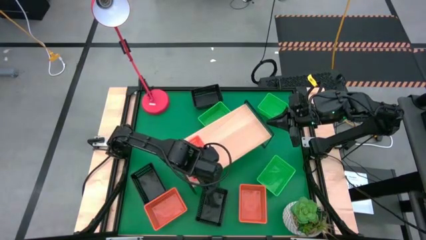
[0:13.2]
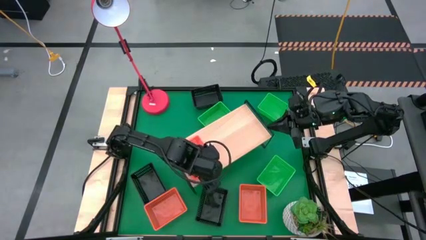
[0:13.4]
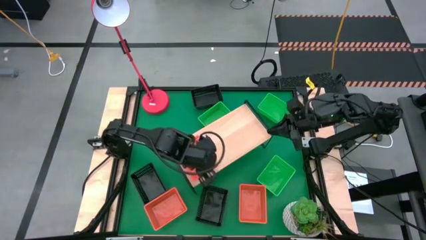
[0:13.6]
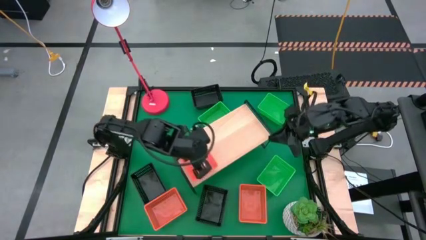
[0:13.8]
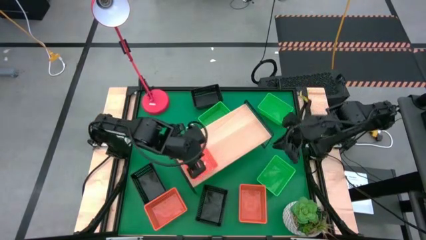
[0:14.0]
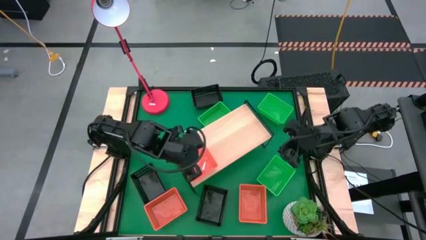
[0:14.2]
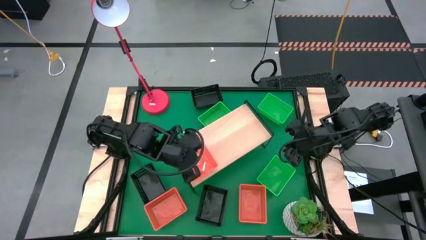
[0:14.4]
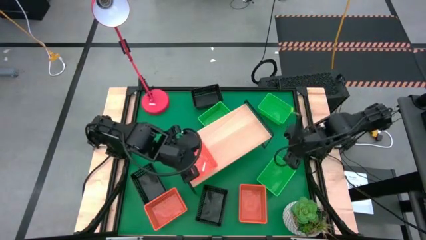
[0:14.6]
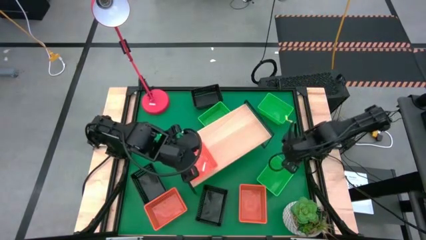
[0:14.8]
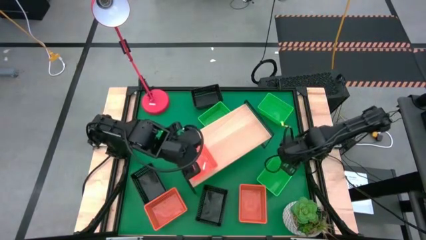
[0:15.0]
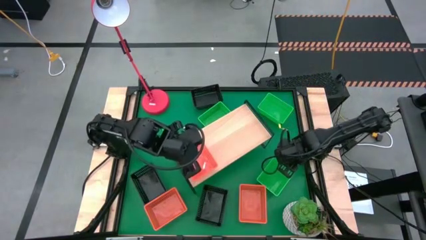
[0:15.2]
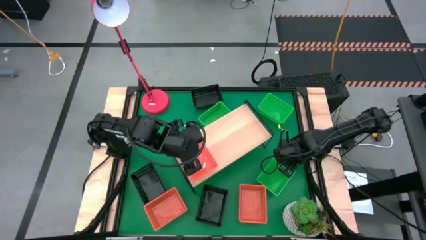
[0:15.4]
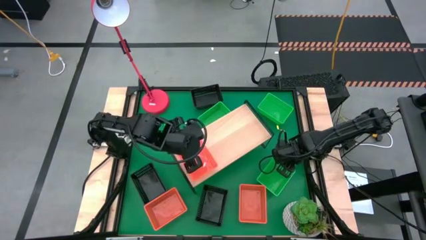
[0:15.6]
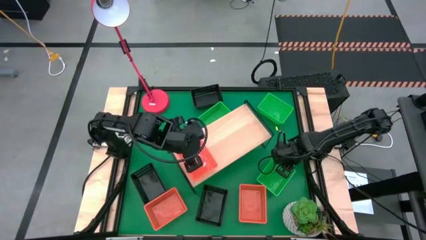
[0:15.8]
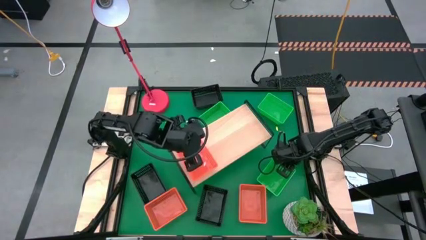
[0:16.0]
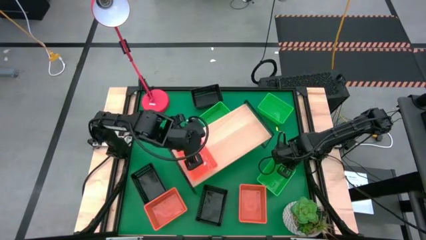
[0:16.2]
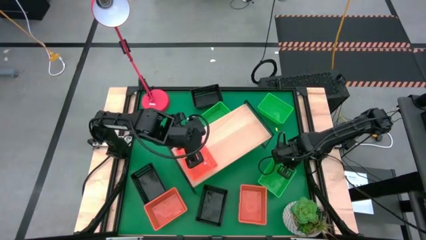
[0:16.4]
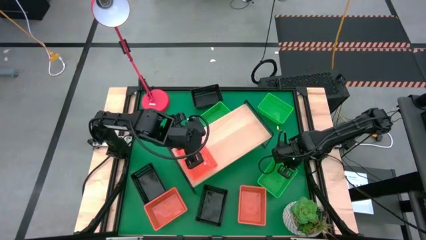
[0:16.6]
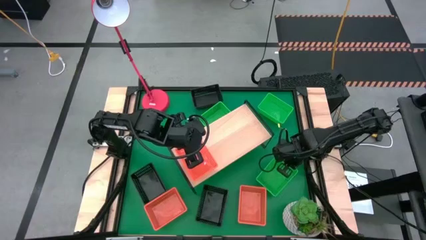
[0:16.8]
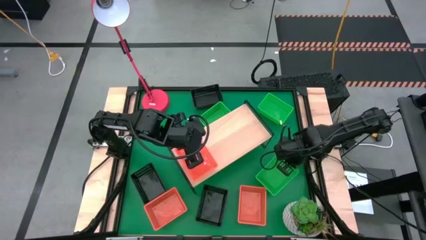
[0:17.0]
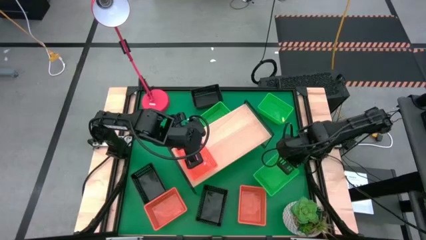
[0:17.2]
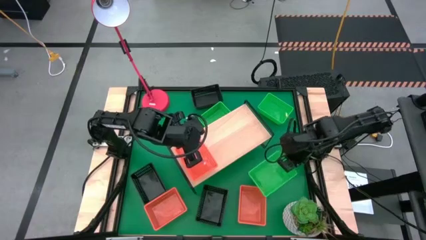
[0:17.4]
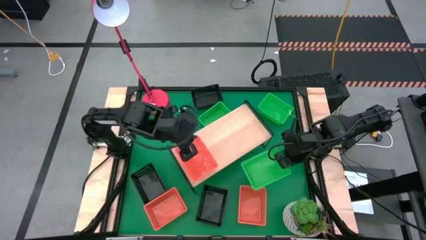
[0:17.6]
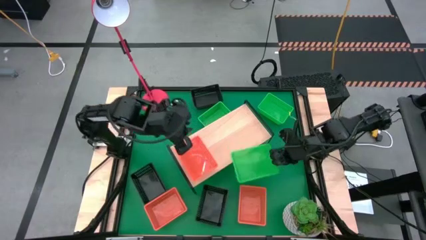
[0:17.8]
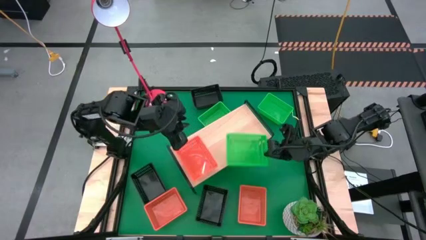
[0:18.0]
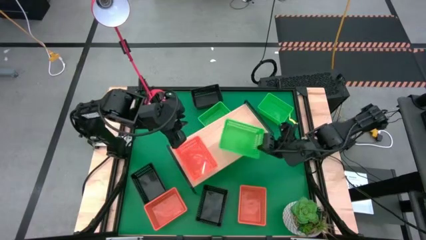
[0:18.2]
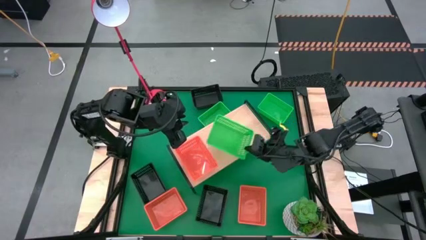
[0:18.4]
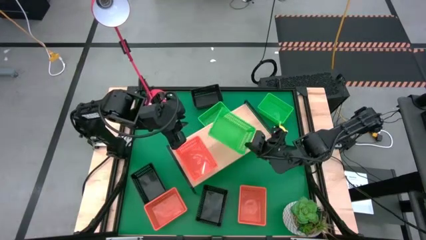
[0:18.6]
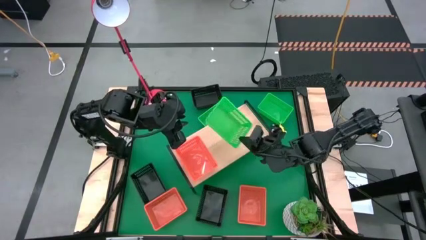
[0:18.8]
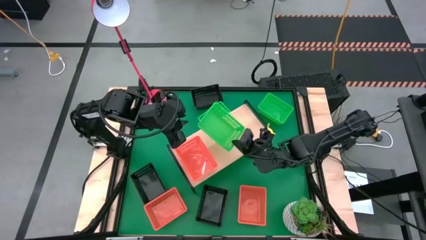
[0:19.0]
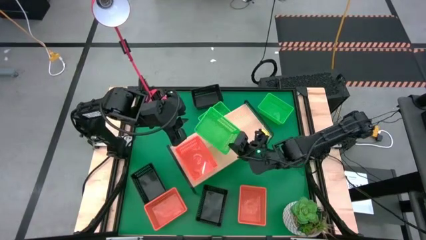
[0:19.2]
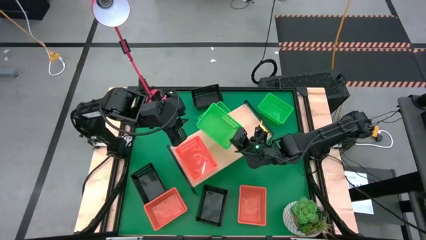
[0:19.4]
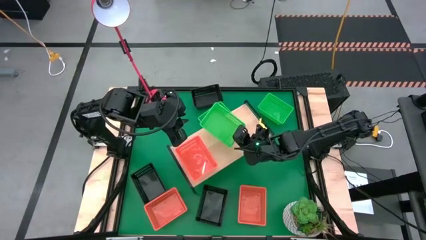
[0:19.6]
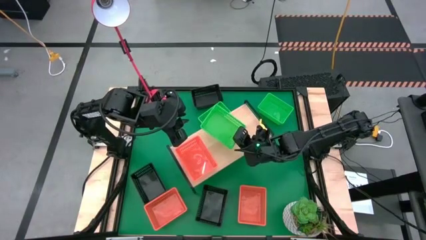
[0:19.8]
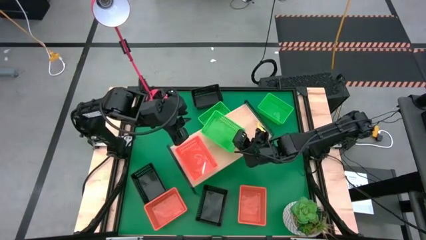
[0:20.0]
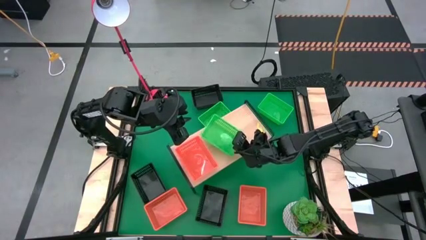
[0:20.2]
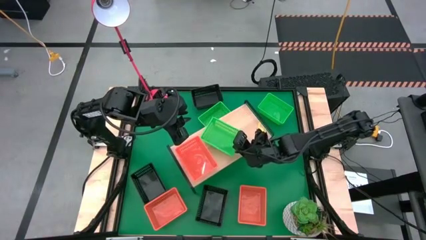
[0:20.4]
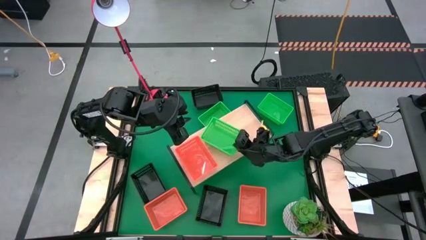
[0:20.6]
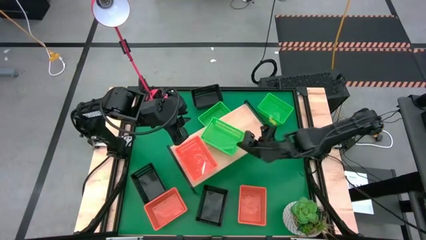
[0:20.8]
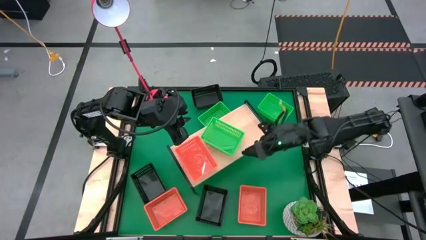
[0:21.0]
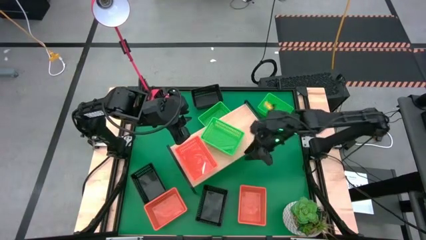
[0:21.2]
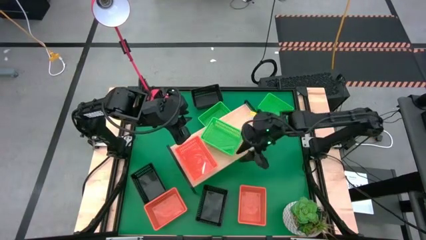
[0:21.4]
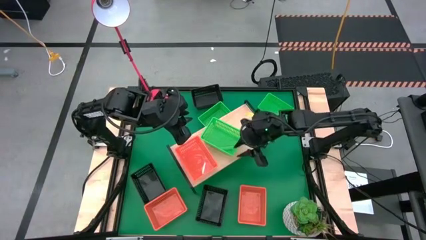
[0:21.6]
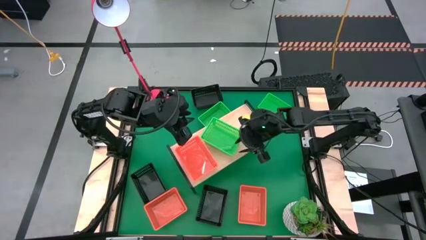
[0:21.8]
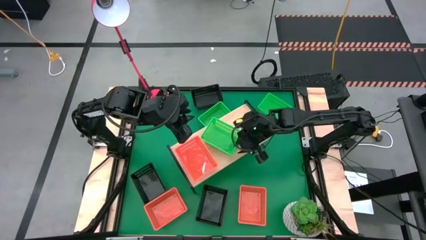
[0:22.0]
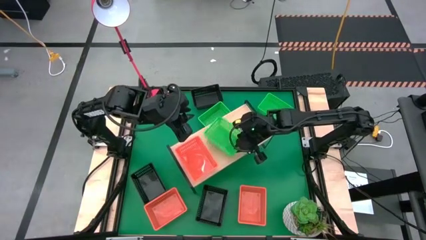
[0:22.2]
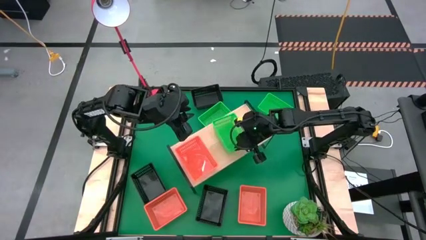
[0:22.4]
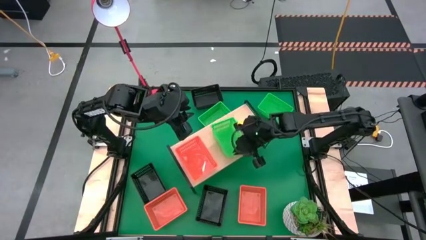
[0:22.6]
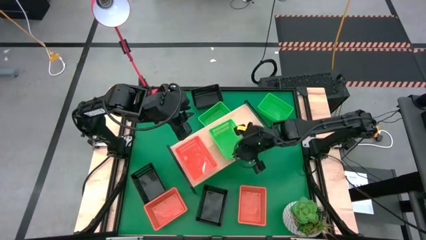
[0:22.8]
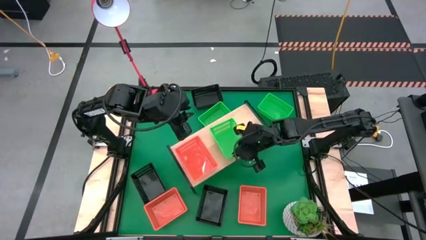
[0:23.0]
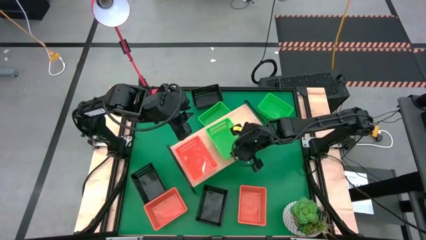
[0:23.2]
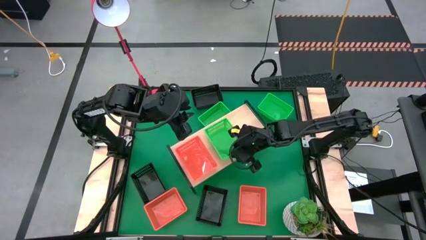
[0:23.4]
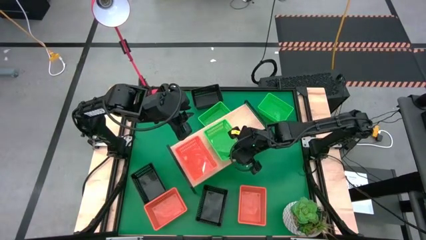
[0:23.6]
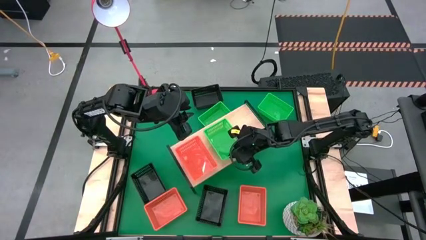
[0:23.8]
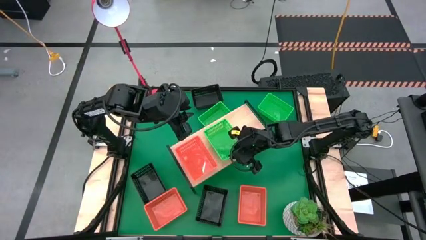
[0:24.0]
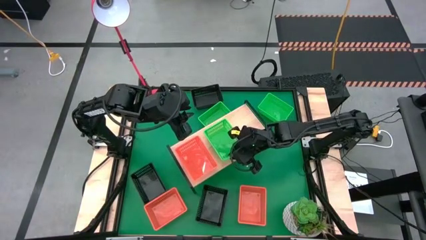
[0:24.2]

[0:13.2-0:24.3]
Task: Stack baskets on shelf by color
Put the bottom green bin on the shelf

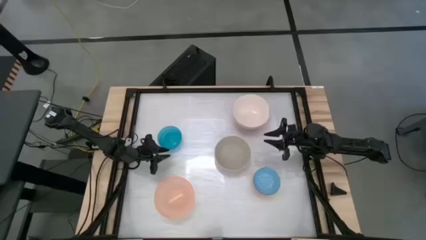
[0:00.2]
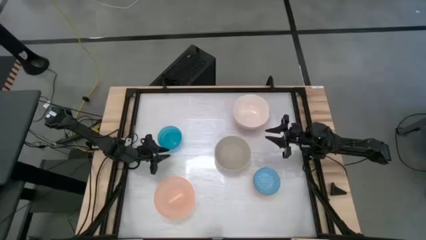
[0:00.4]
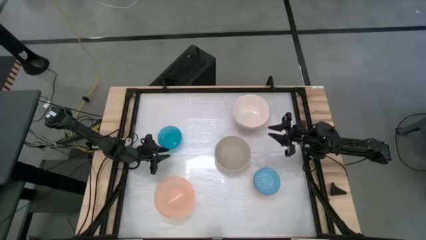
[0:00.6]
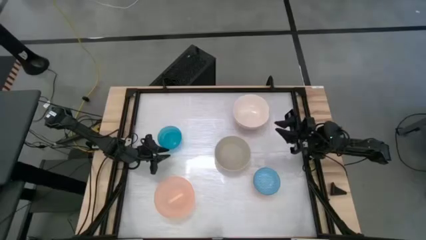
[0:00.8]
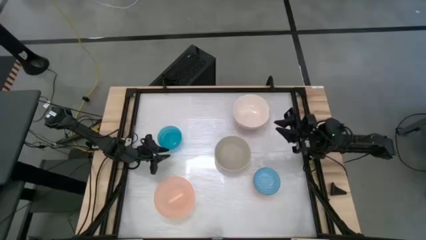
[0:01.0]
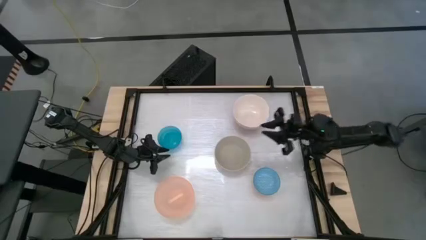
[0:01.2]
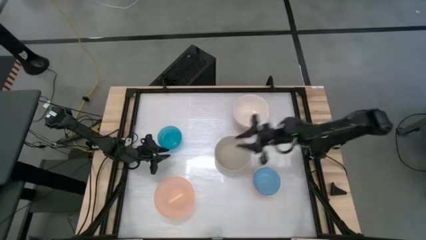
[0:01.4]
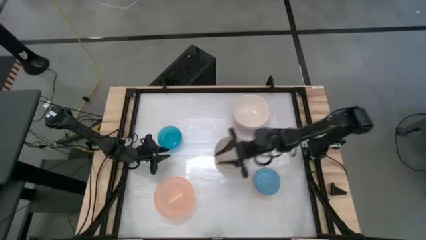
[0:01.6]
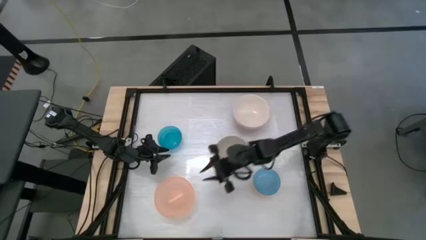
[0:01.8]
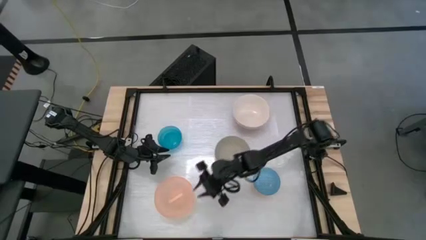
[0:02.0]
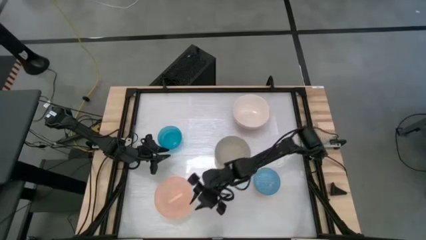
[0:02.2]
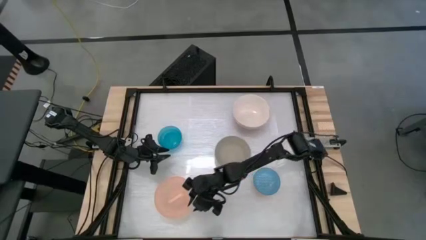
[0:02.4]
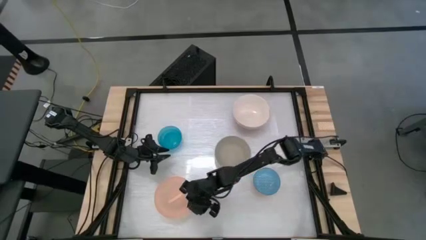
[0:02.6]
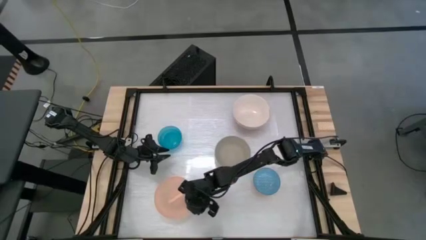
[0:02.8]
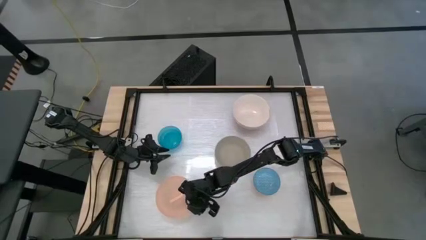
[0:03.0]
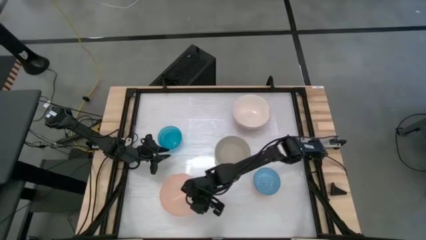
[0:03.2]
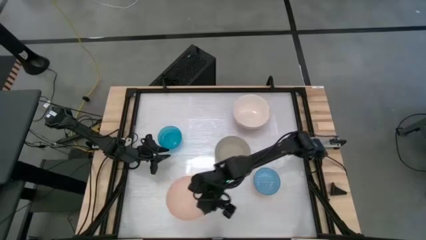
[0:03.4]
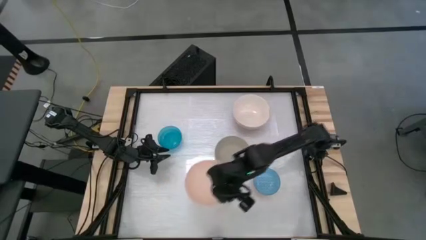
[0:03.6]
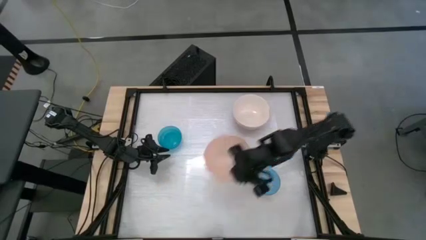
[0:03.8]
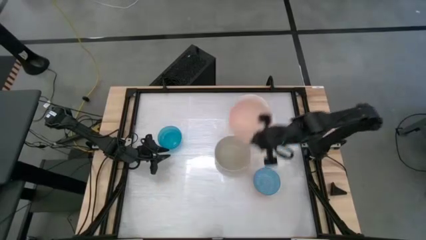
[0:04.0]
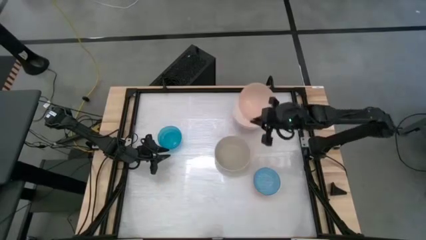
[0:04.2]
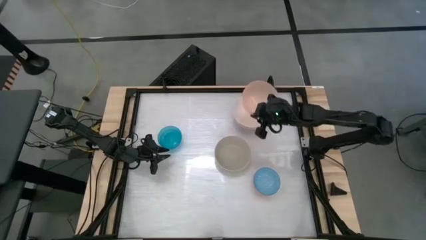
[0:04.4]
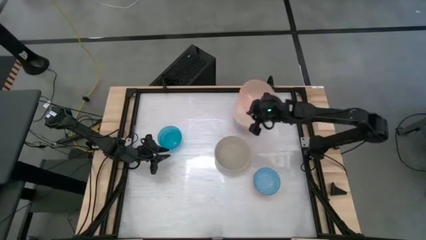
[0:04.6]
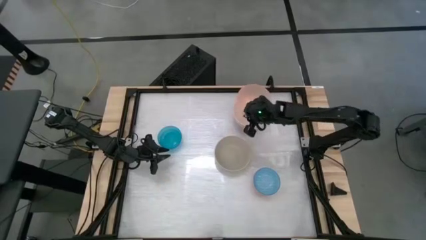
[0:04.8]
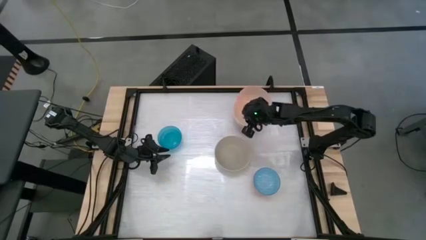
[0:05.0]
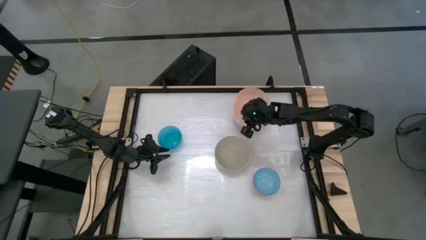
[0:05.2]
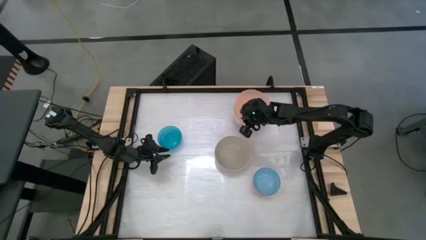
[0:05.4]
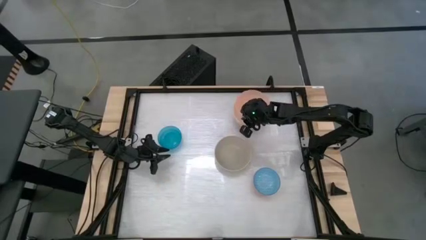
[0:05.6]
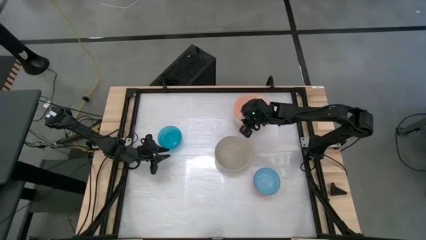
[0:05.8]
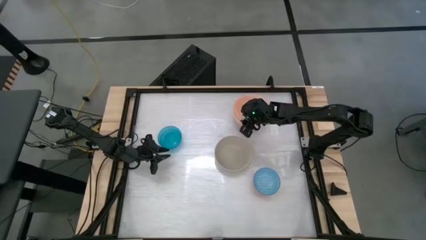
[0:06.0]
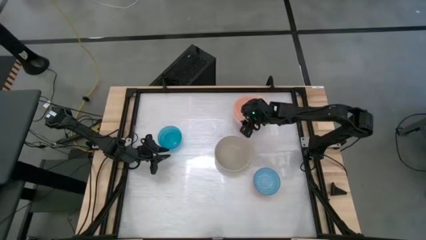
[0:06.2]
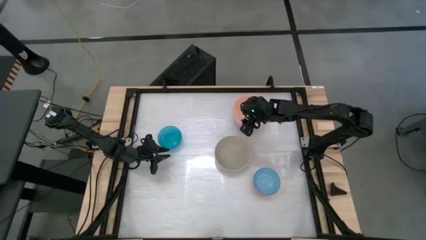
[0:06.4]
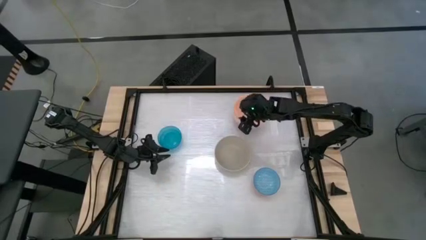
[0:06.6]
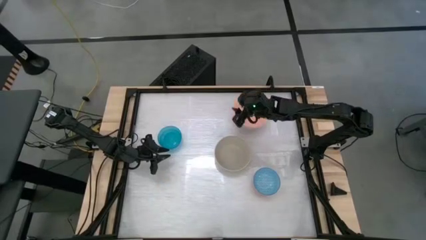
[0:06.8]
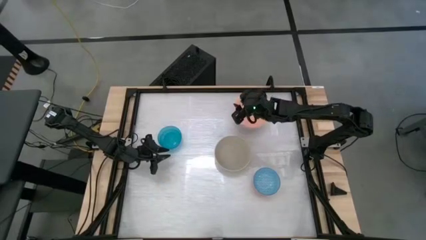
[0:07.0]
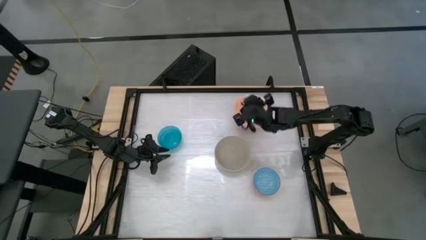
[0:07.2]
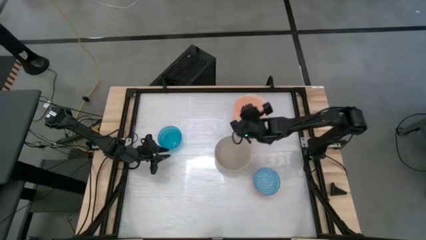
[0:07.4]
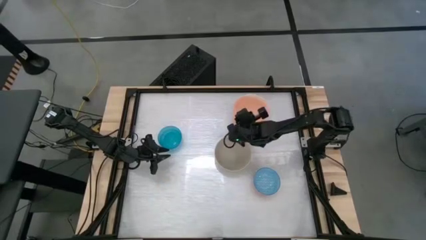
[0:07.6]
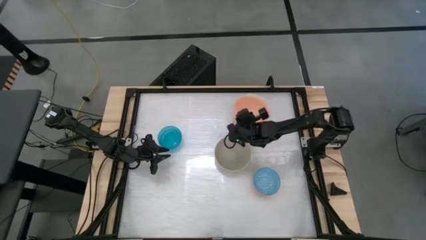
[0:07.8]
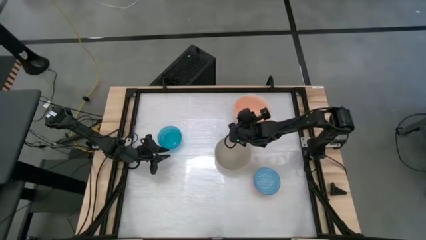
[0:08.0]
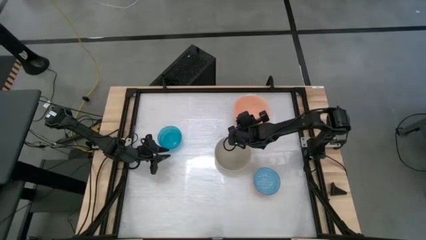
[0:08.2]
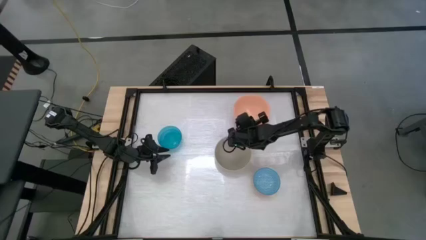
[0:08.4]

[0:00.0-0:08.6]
Task: Nest bowls inside each other by size order
Stack the light orange bowl on top of the white bowl
